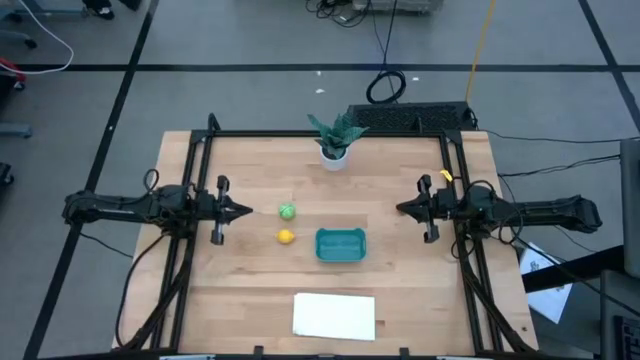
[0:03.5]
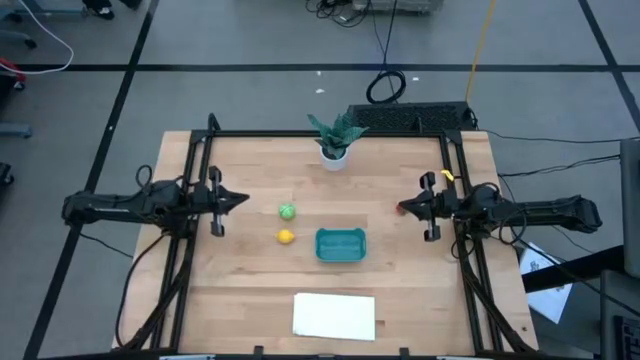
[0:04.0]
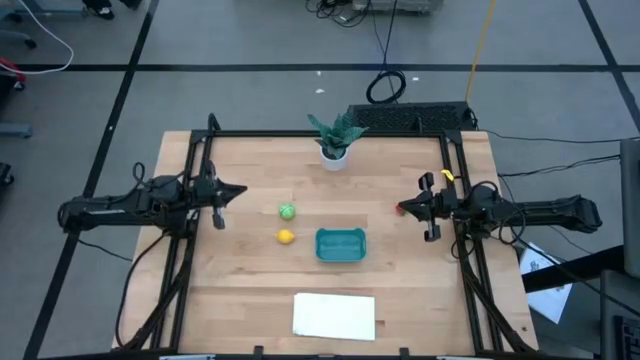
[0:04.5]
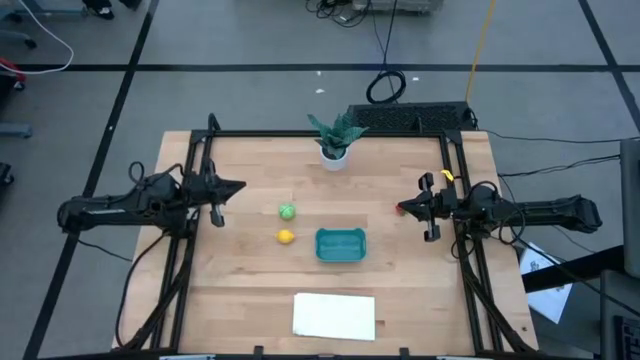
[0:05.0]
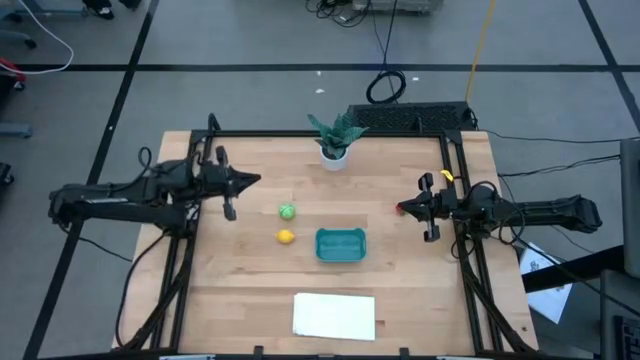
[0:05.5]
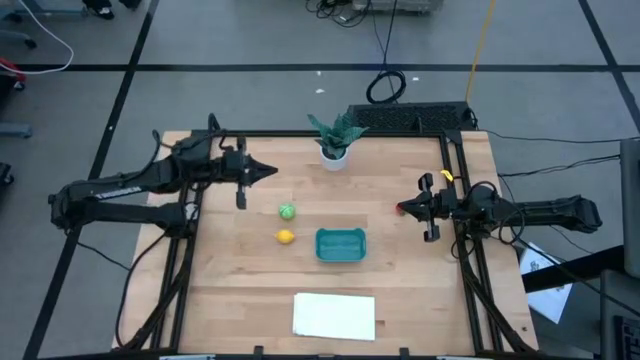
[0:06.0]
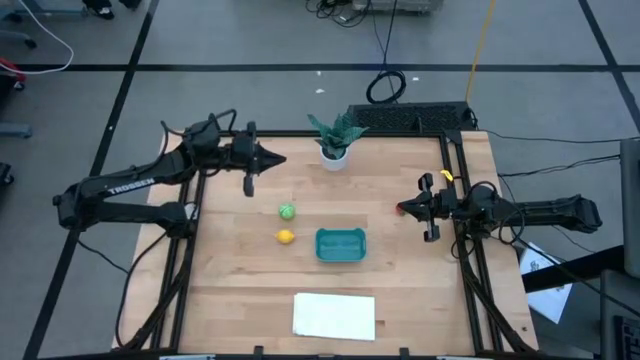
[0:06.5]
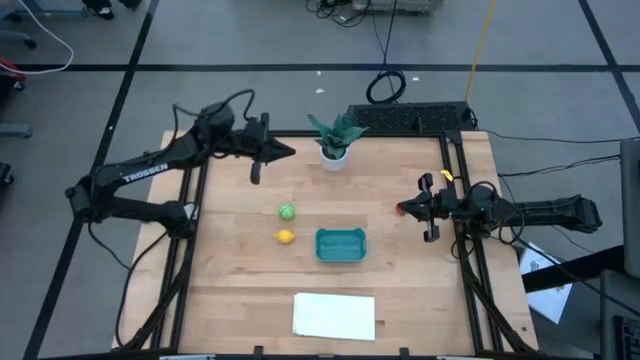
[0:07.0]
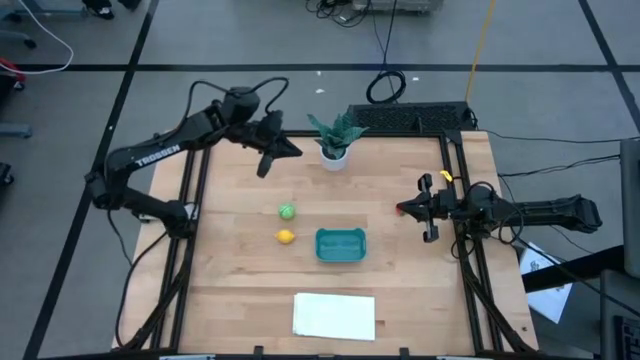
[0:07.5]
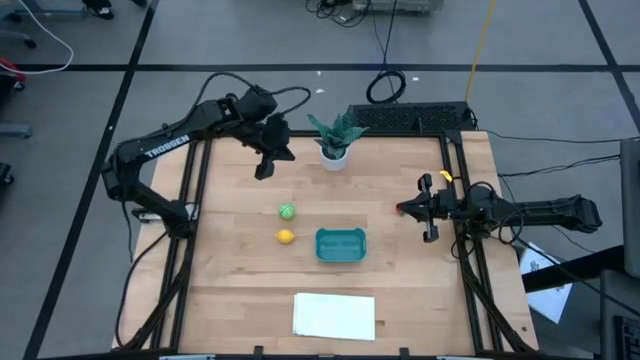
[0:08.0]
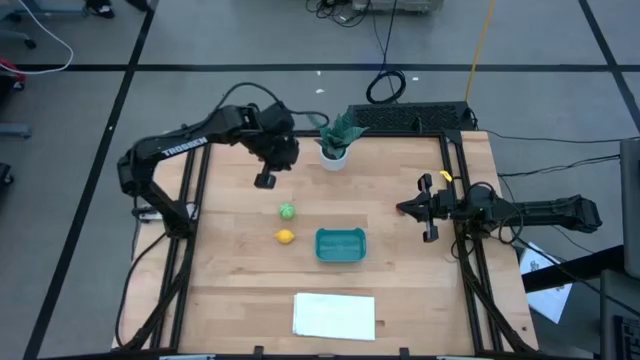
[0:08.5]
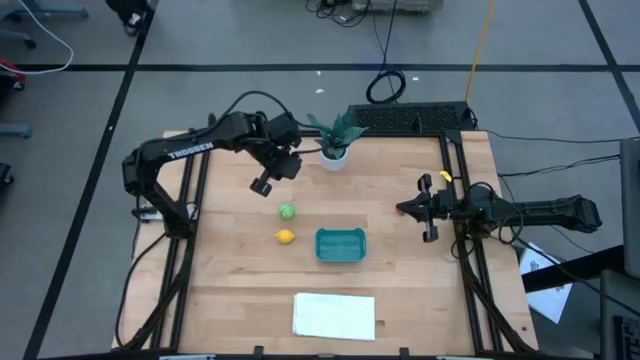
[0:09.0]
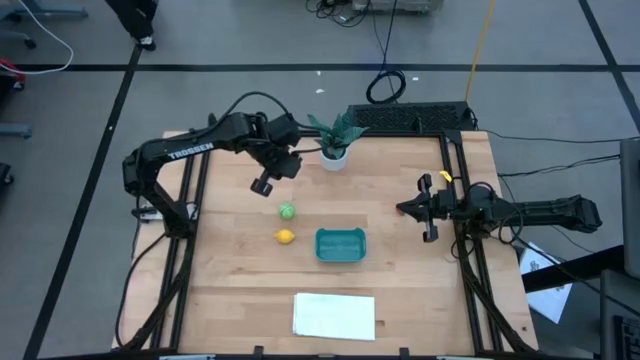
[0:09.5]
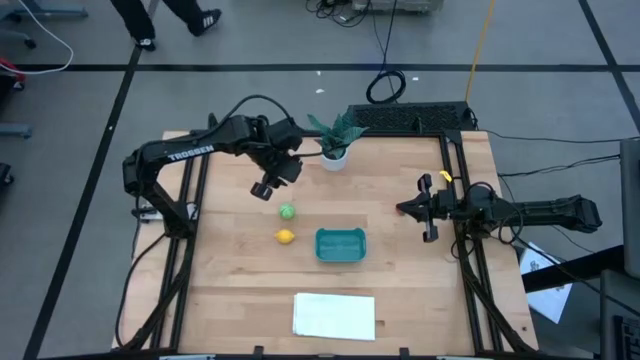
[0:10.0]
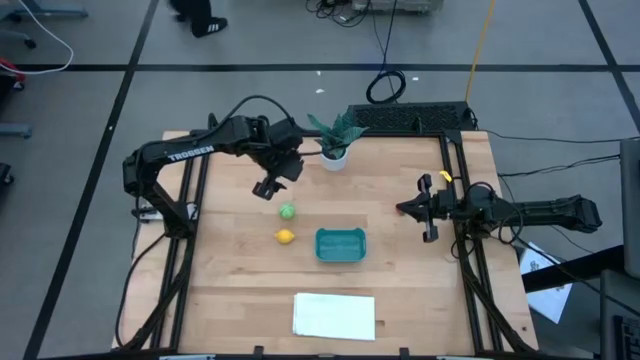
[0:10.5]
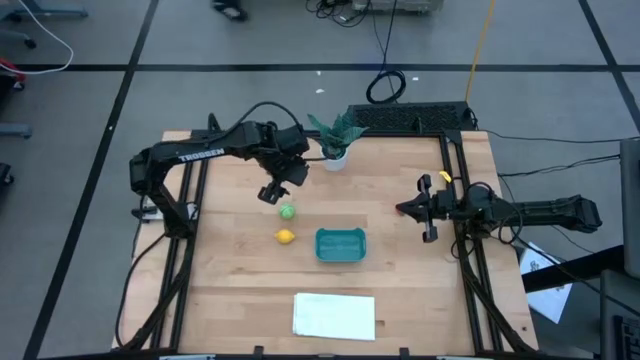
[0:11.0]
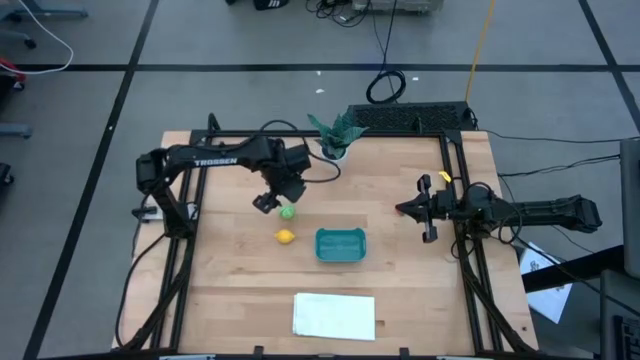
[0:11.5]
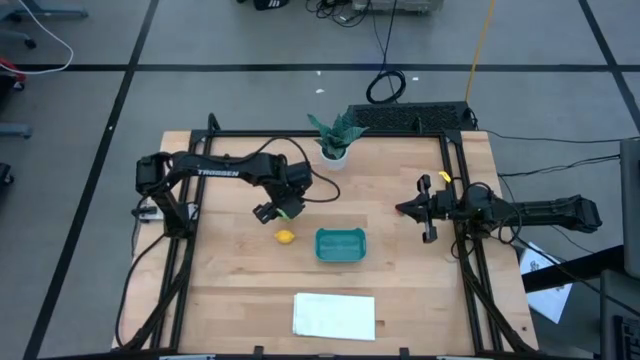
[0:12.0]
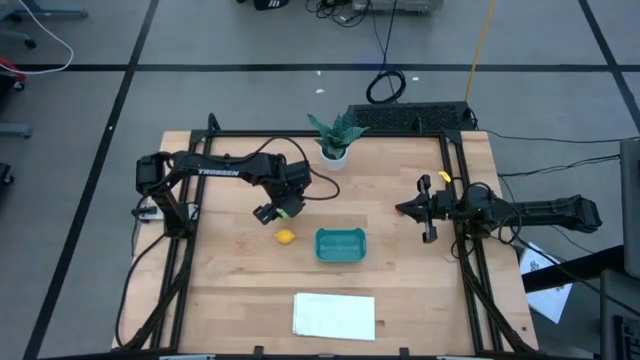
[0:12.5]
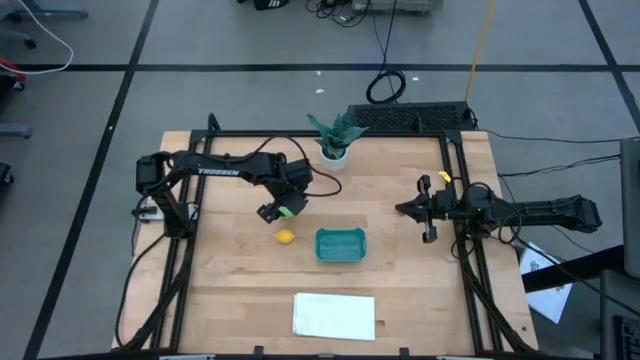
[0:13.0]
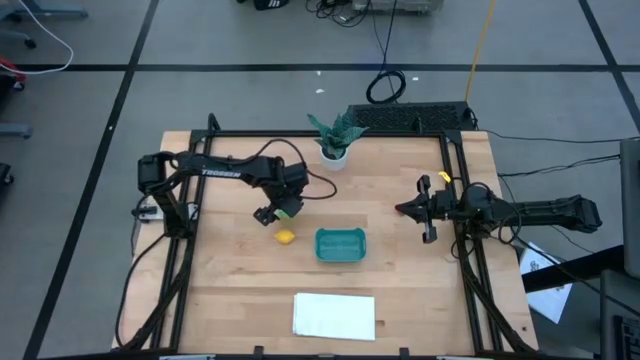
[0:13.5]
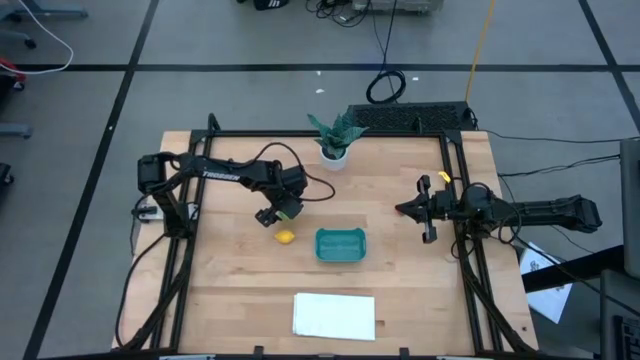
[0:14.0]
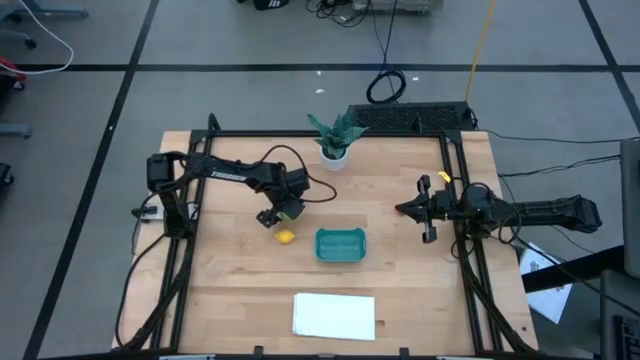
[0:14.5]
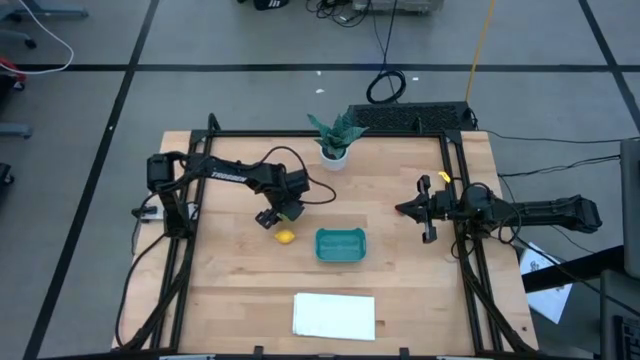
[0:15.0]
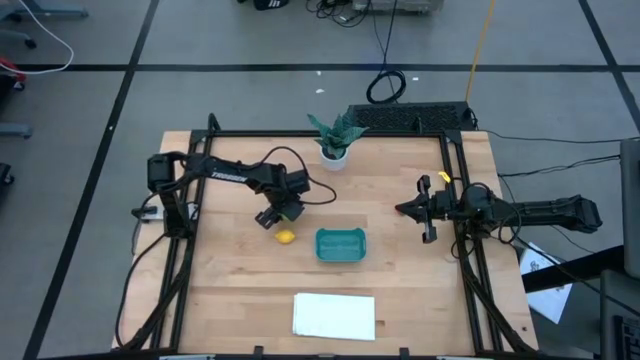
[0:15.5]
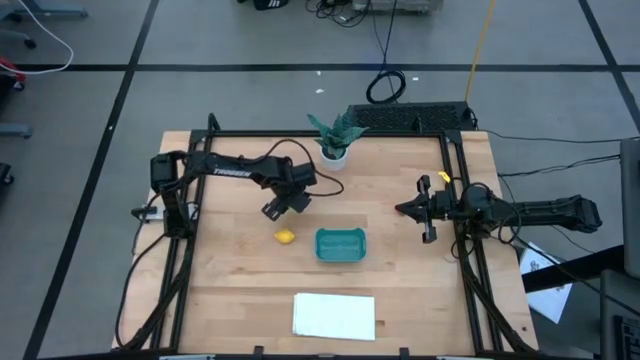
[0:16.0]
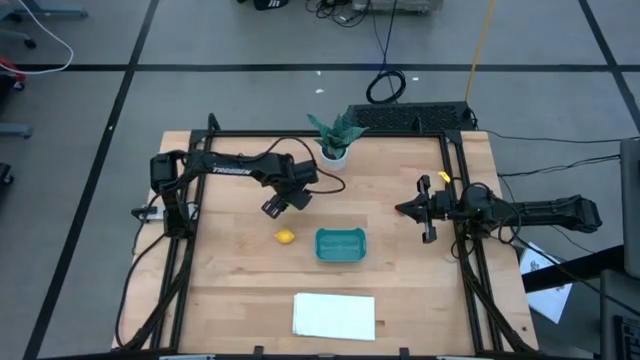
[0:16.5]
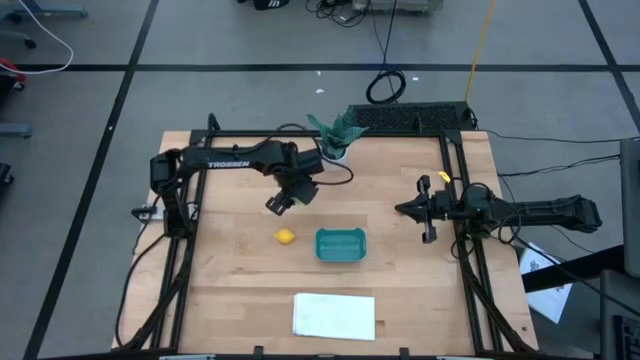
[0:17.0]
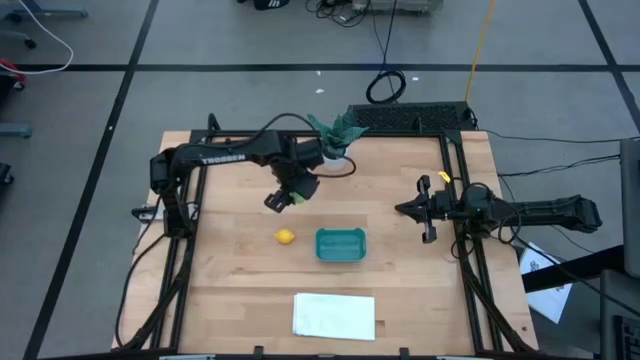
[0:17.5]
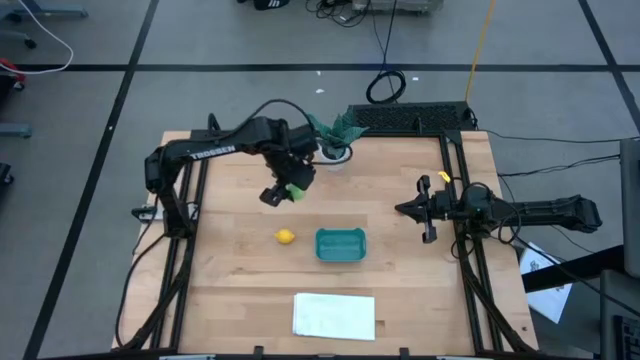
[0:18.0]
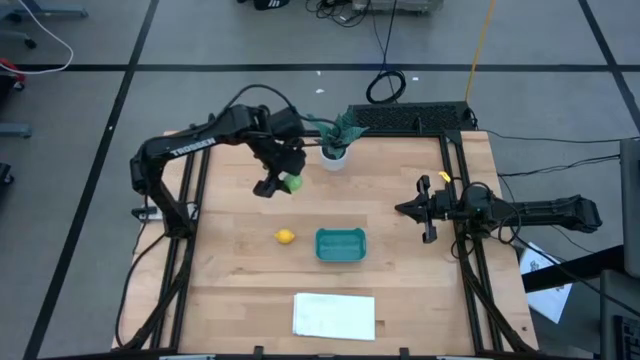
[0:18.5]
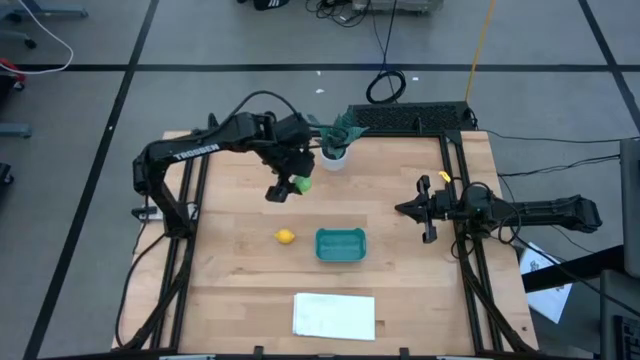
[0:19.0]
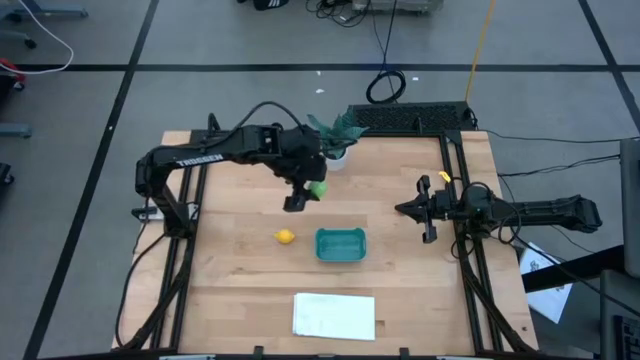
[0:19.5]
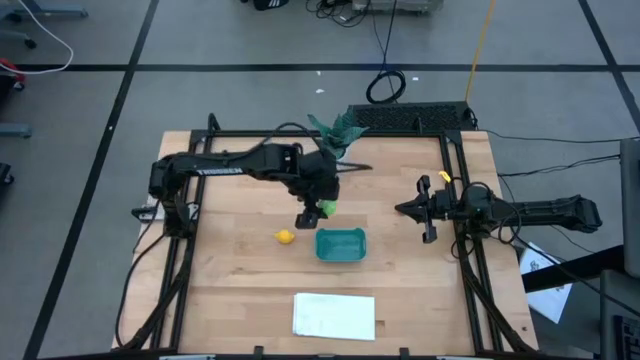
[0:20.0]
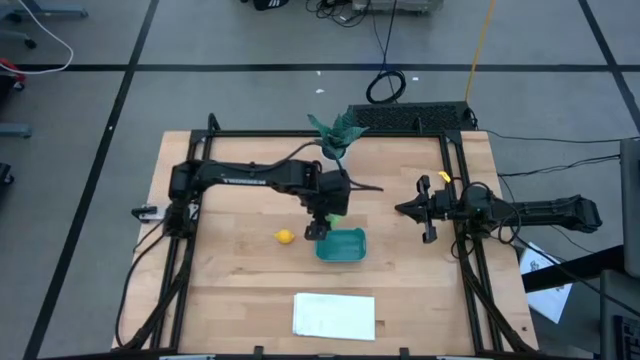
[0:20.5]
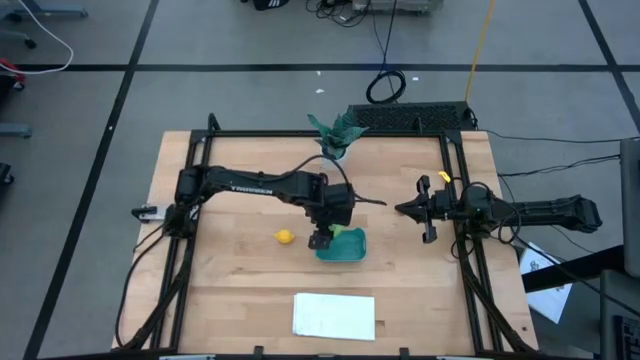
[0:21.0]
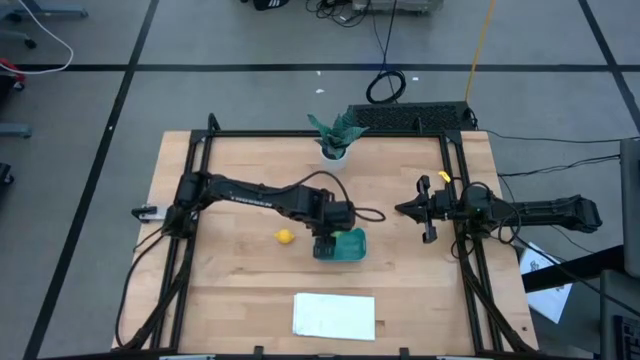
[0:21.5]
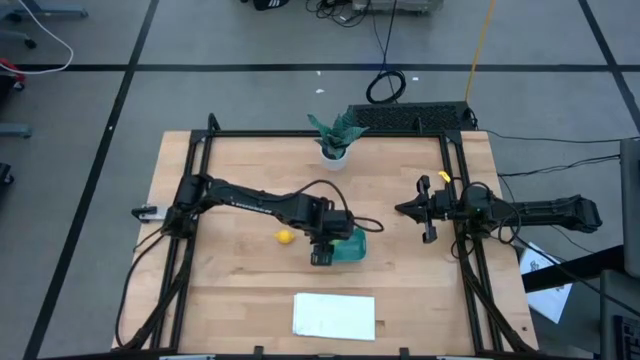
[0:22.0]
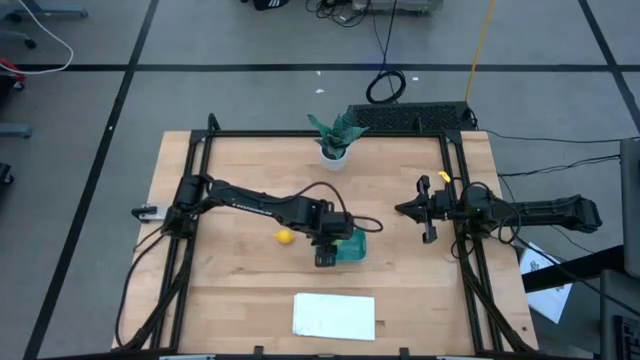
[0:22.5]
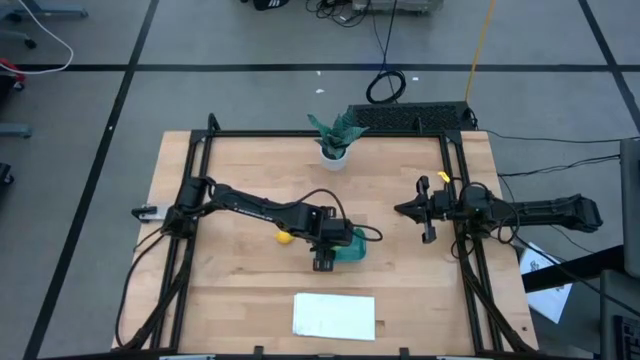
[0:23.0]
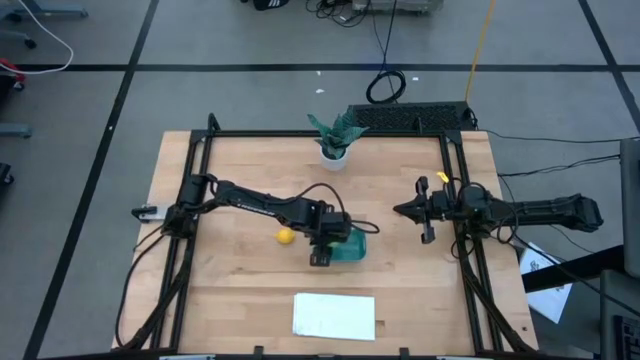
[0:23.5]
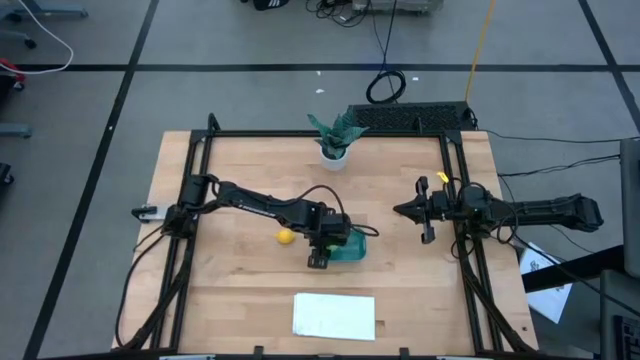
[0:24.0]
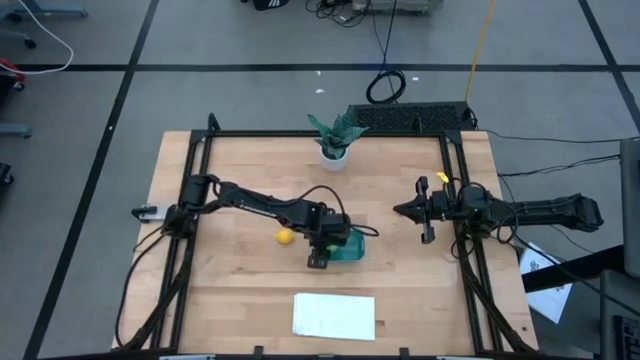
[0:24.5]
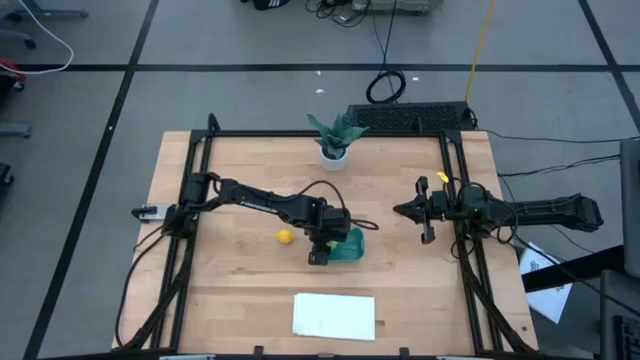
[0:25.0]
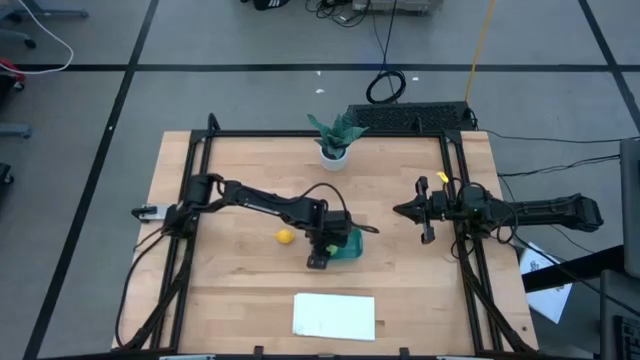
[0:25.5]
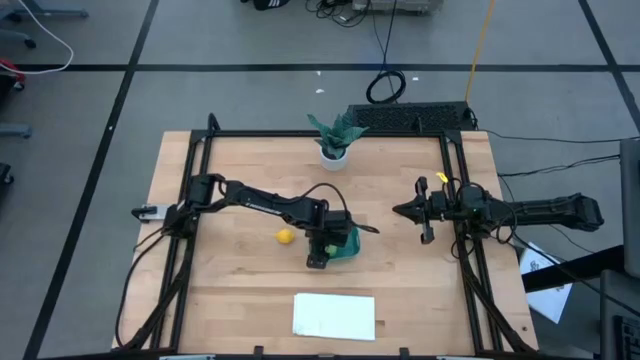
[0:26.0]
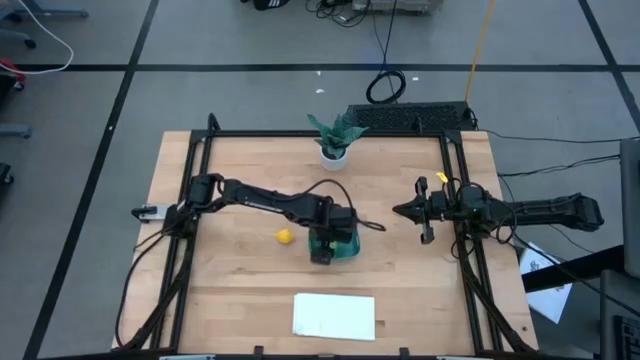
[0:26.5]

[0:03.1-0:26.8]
Task: Pick and placing Produce into tupperware
Put the fruits and the vegetables into the bin
